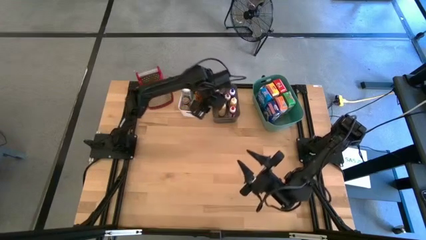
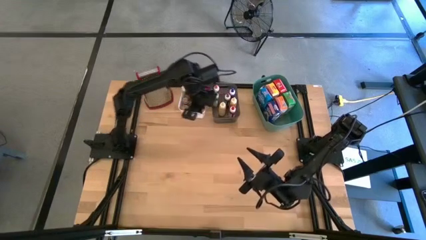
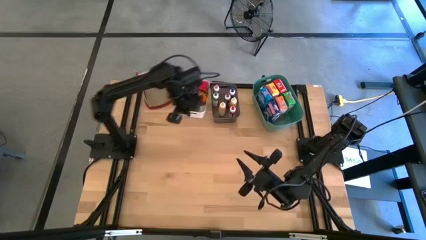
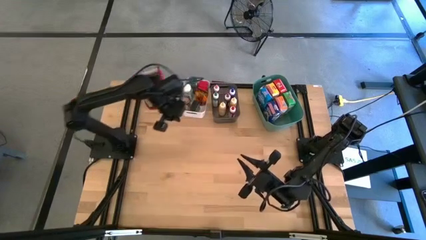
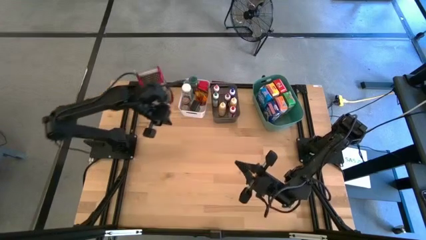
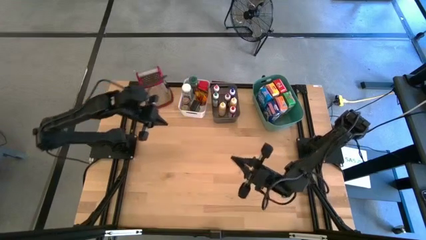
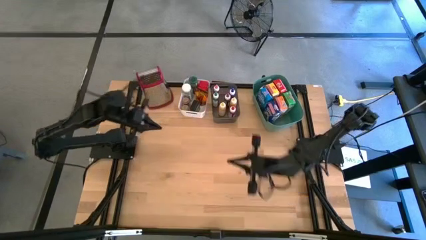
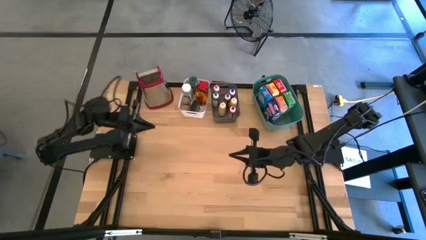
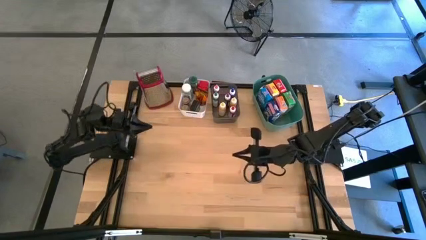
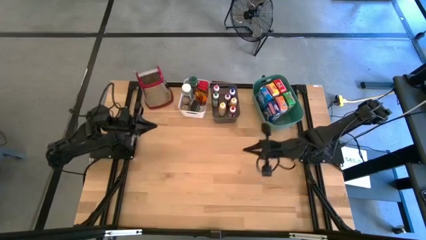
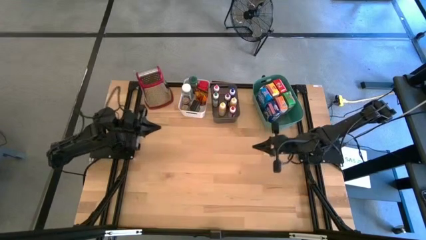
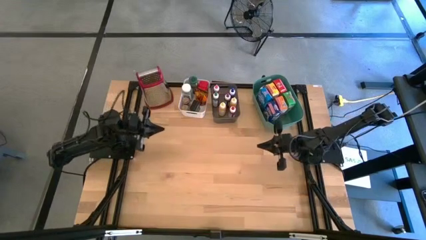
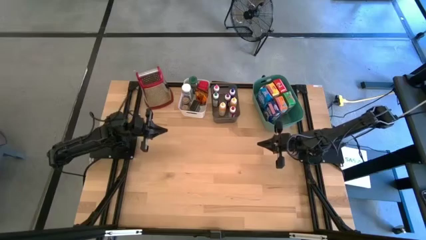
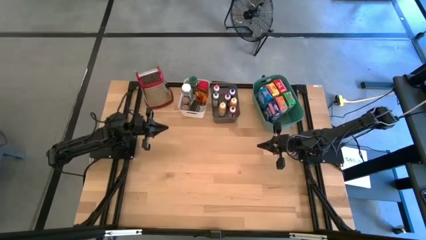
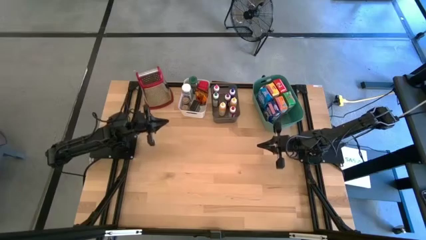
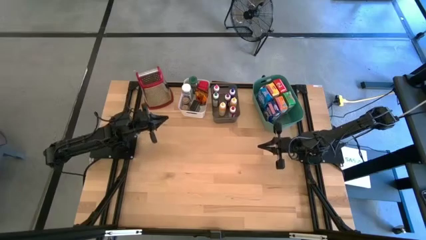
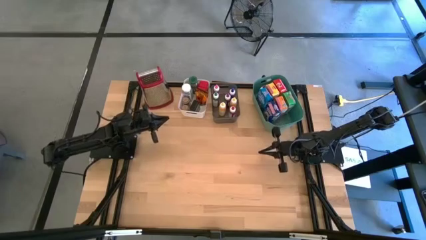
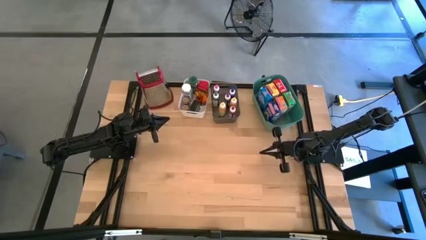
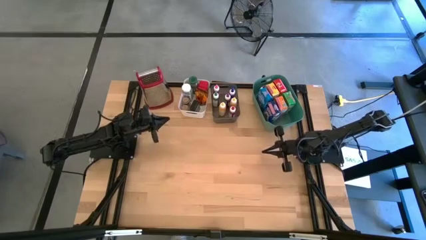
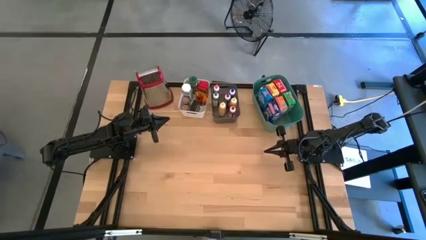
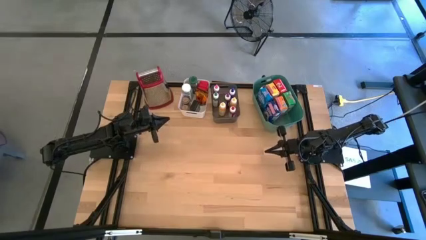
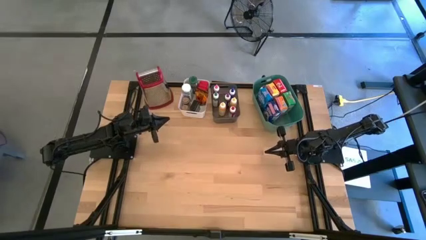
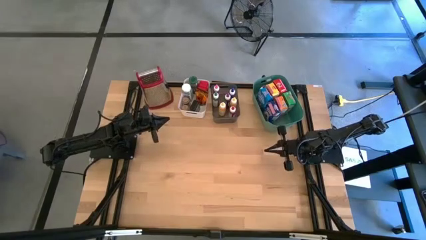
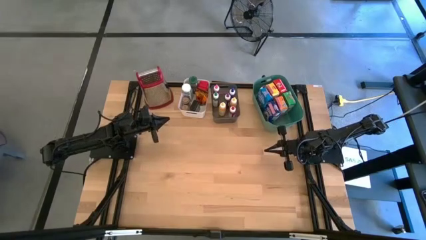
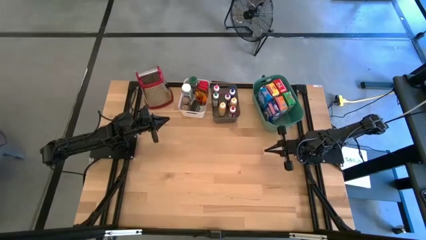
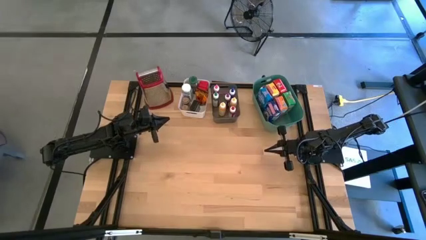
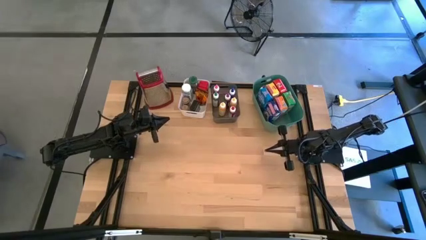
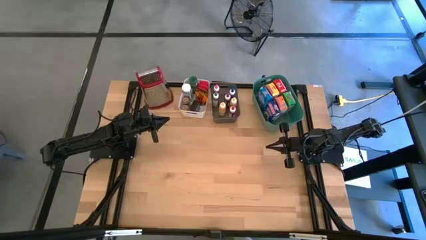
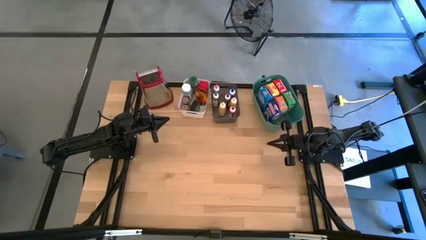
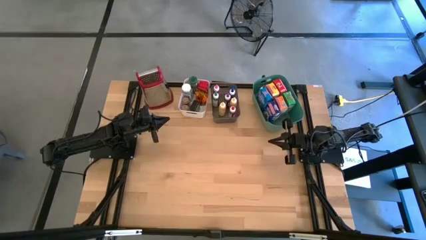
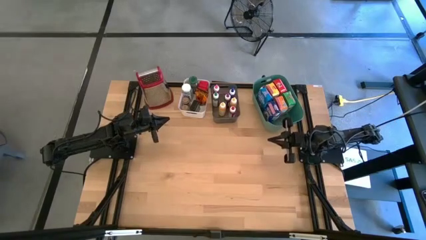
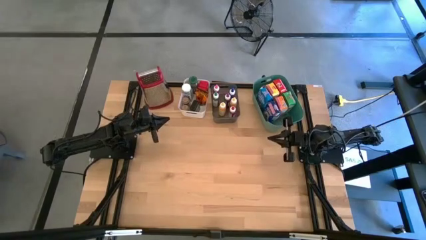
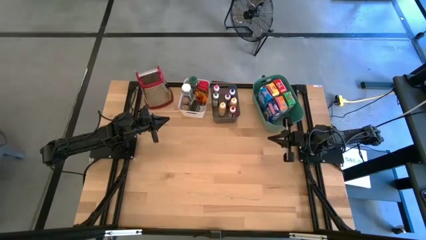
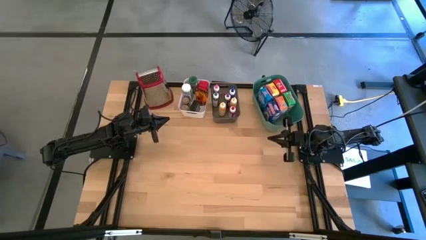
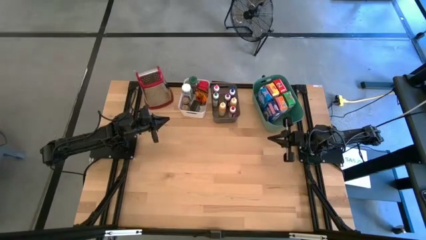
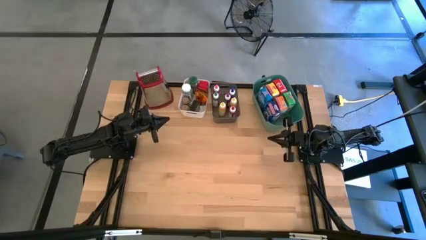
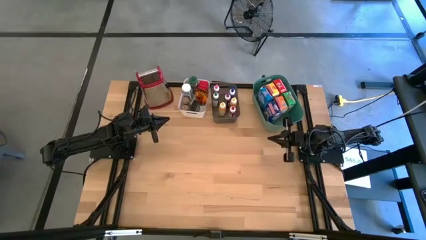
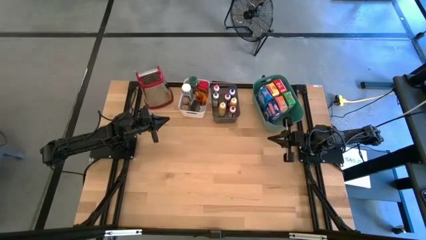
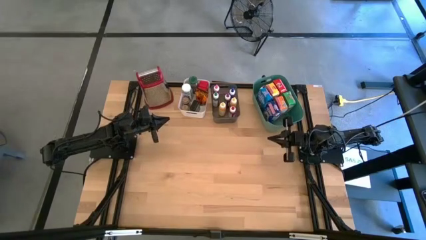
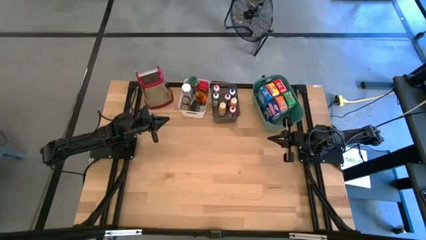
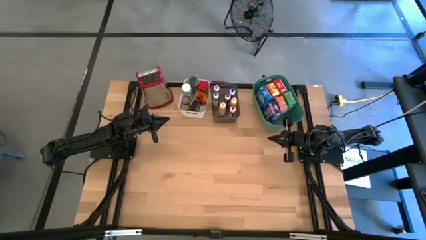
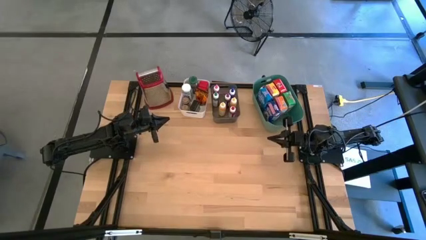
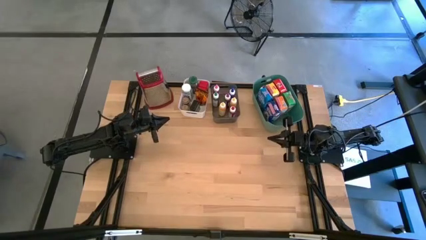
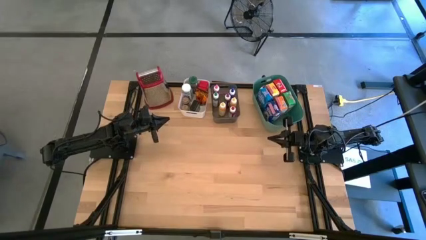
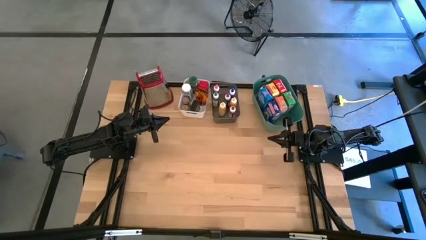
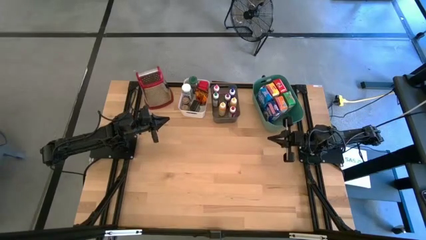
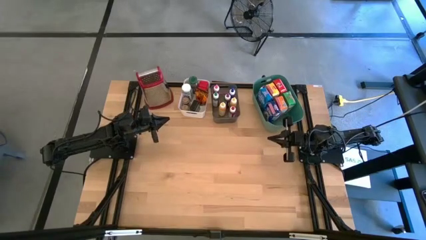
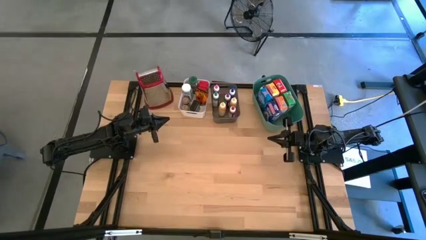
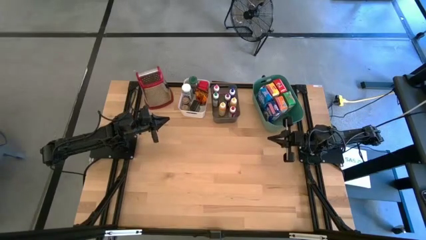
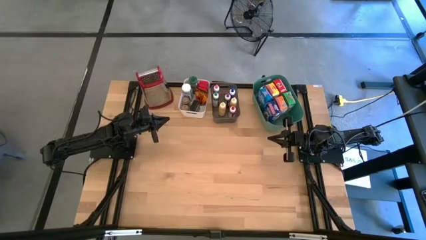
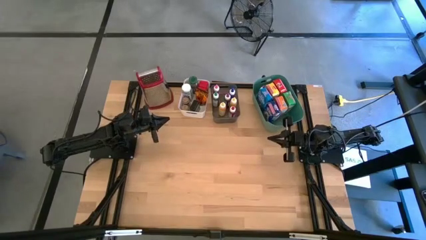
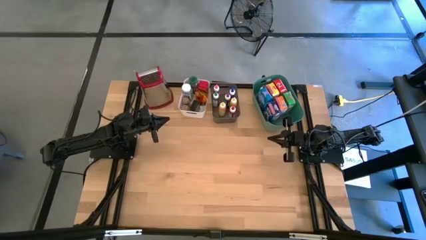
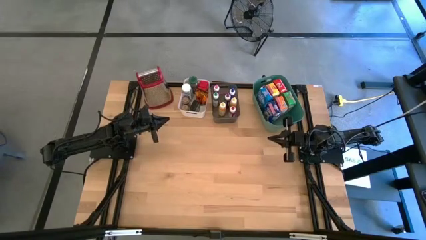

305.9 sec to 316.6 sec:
Task: Pick & Place Kitchen Items
Return to Home Position

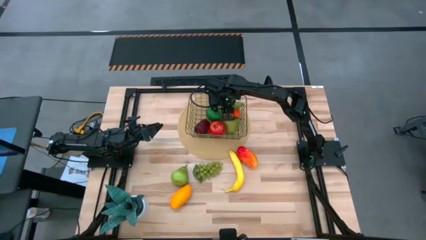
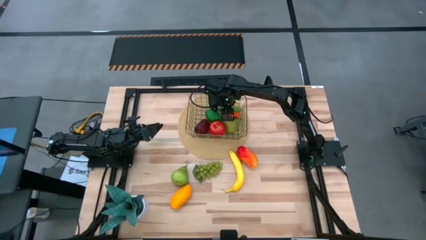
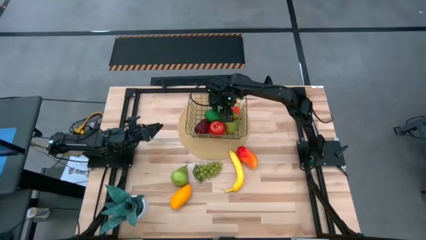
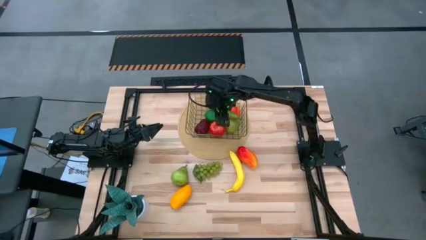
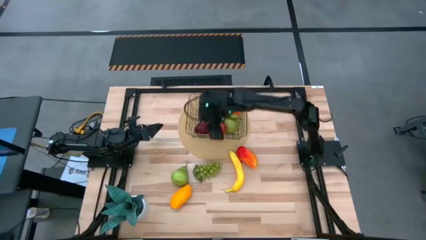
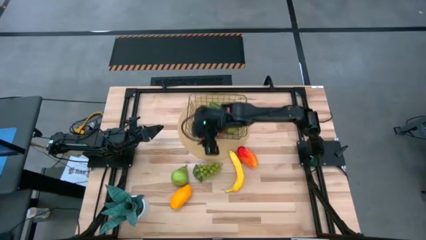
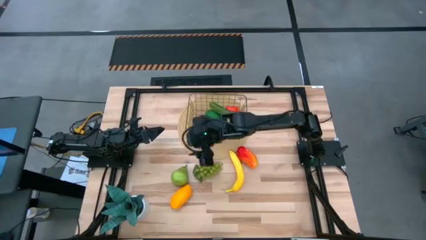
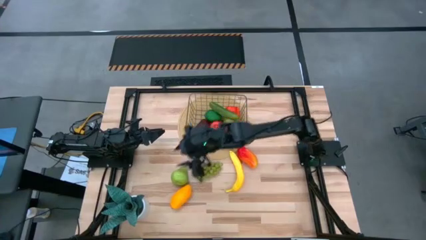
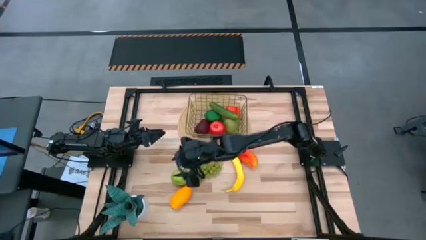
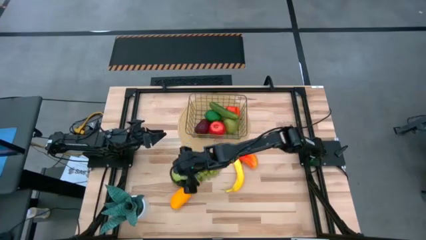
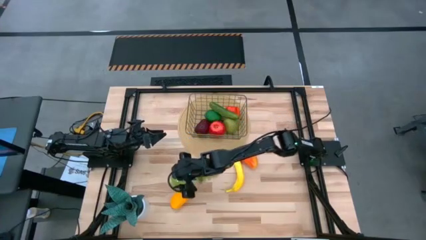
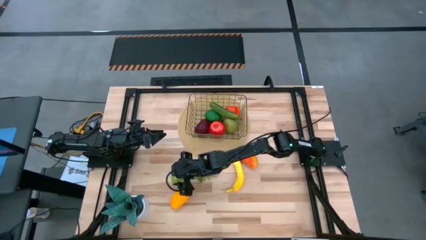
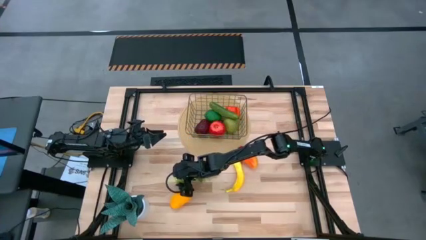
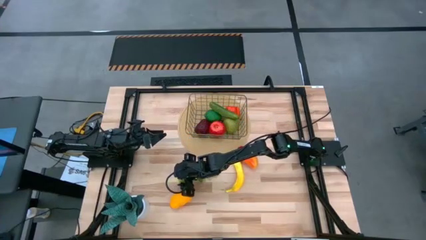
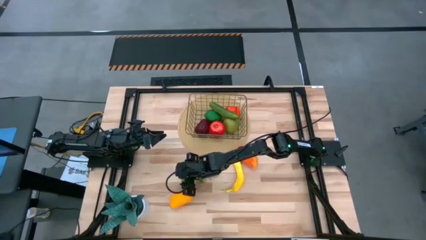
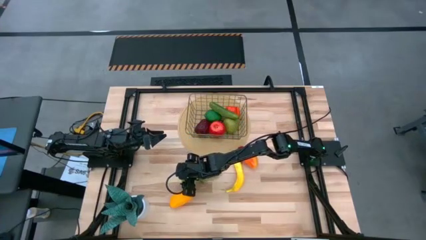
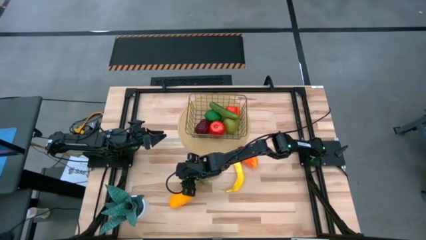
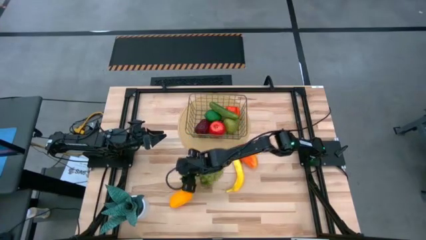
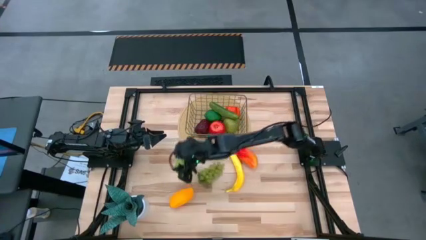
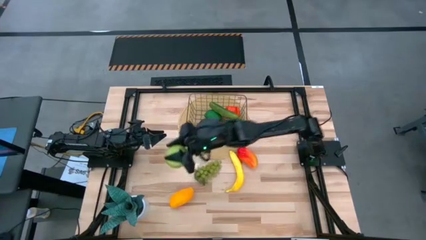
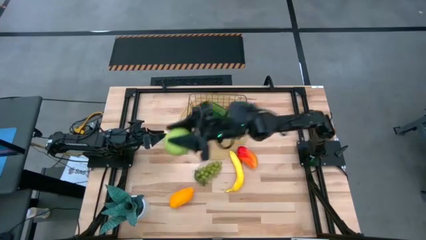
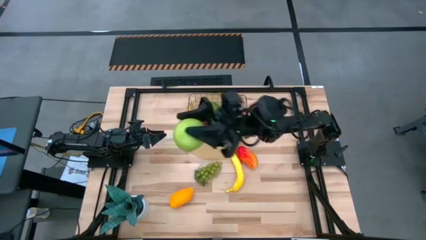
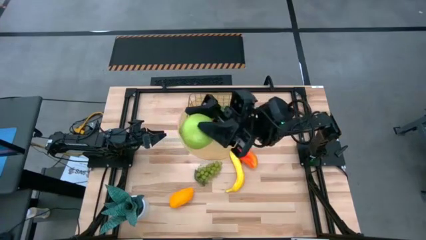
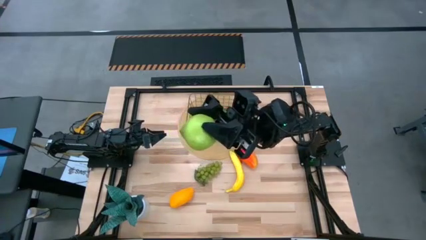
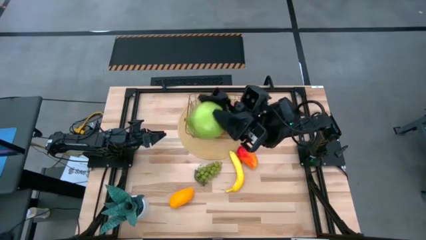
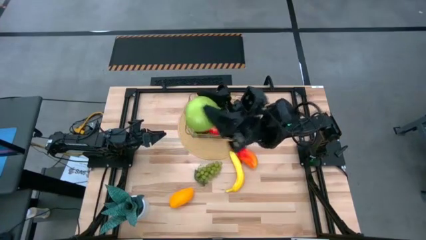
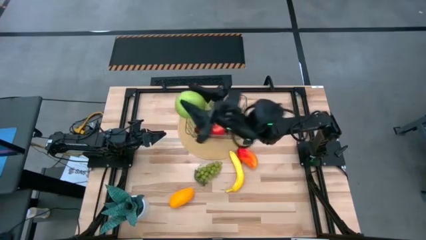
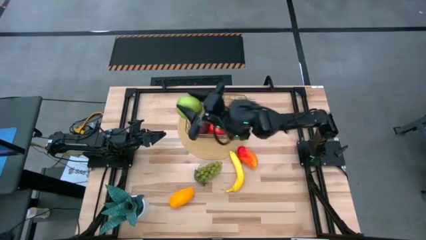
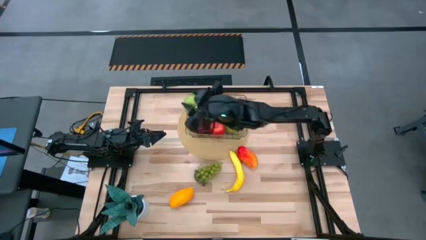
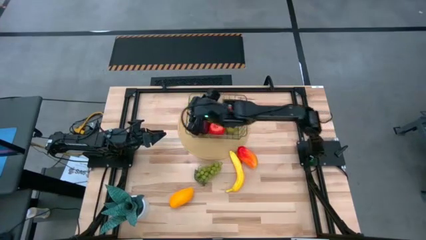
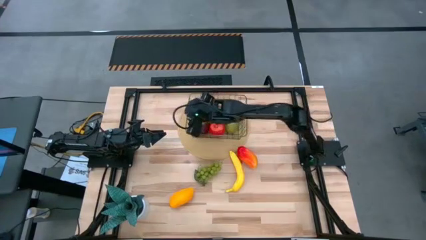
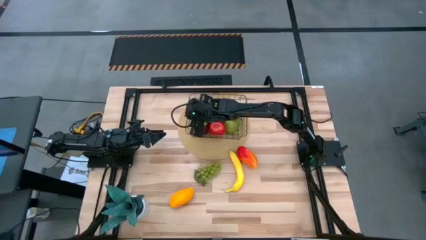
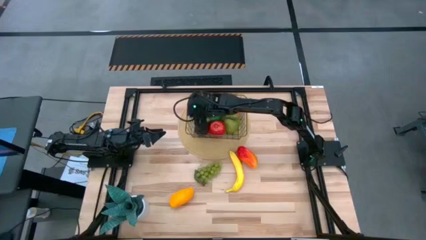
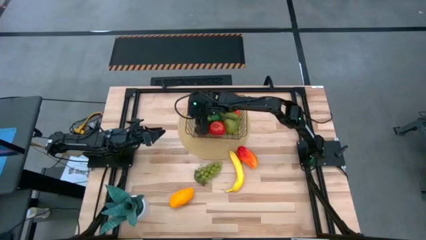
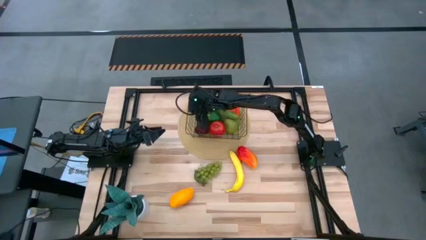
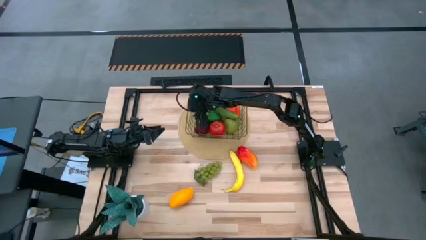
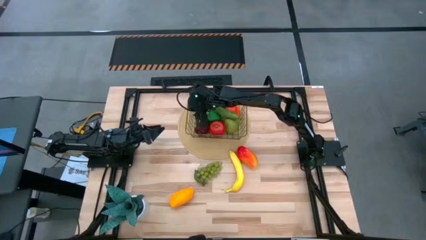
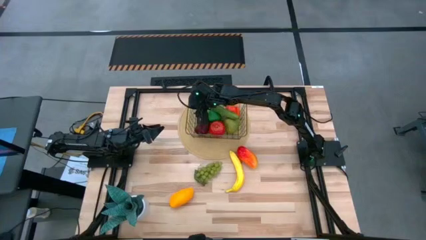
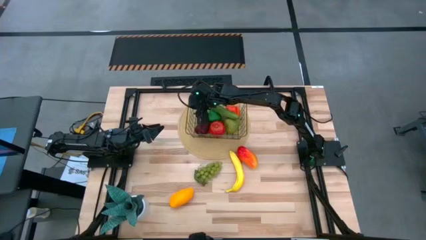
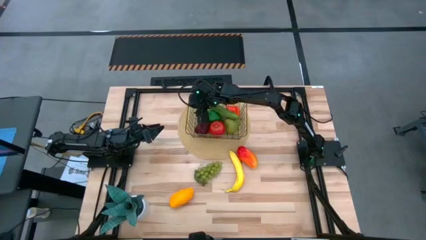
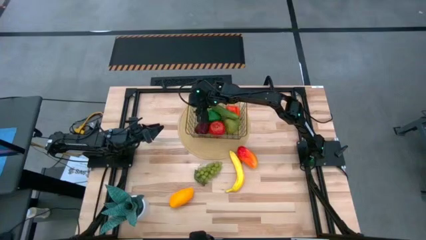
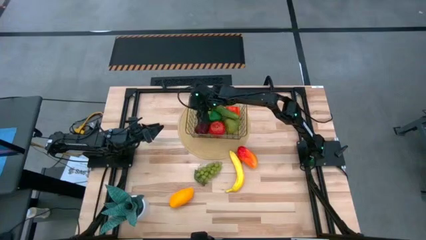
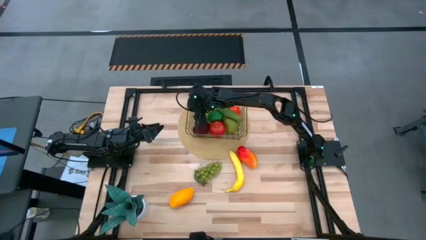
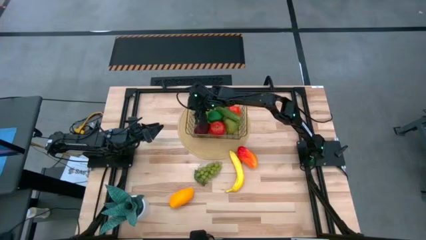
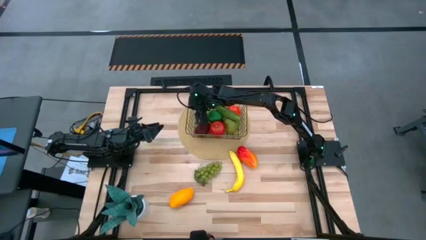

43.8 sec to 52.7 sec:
Task: Build produce basket
Put the green pear into the wire basket
